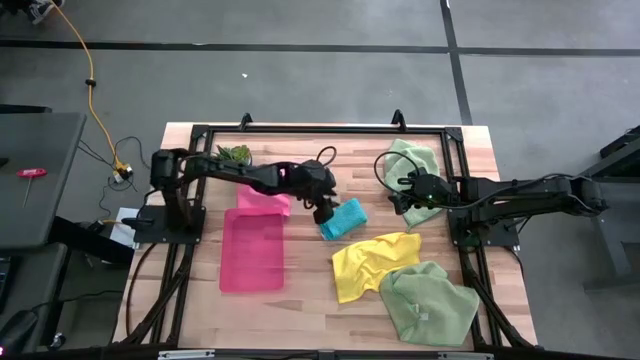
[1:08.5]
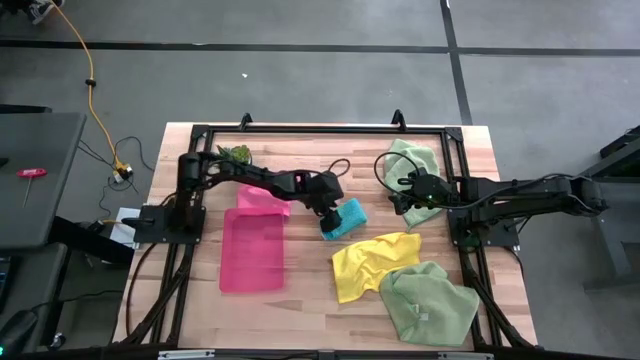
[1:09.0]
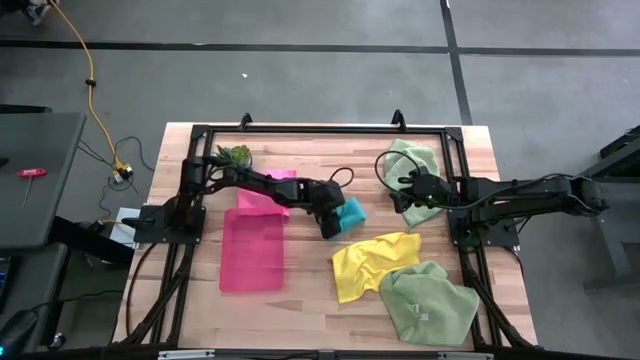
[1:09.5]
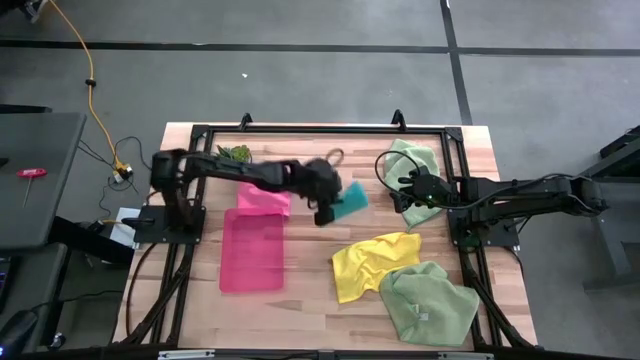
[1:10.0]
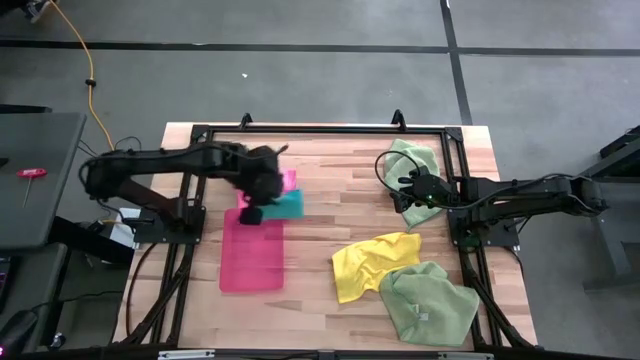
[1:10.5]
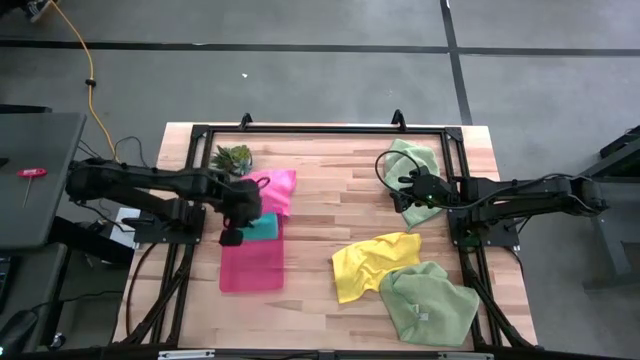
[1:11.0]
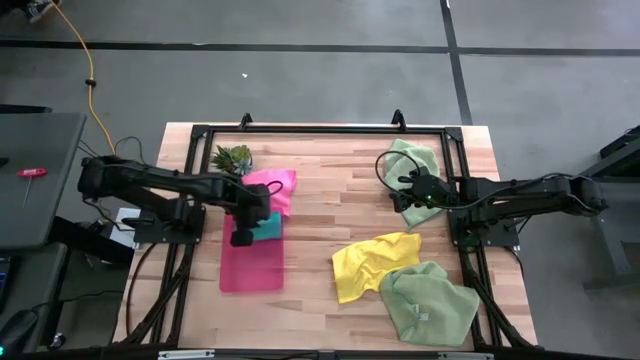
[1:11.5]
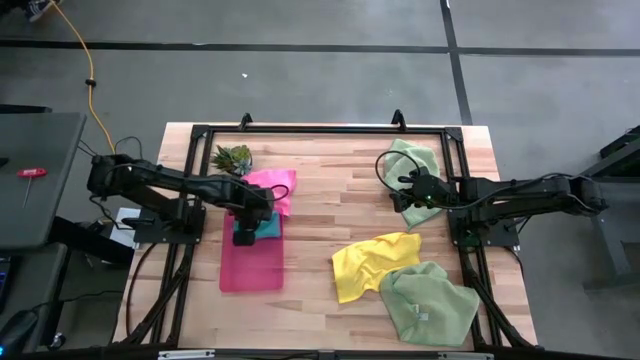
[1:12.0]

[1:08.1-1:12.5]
Task: Fold microfiber towels
Put the blue microfiber towel into the red bin
